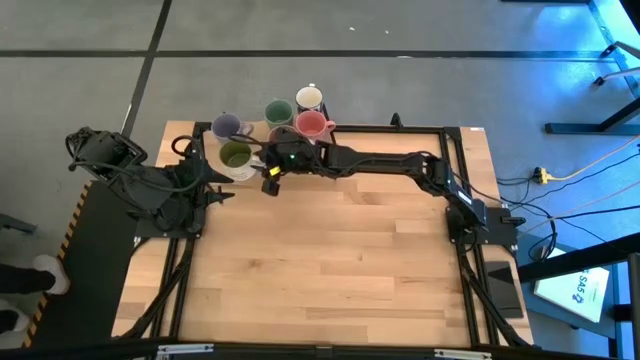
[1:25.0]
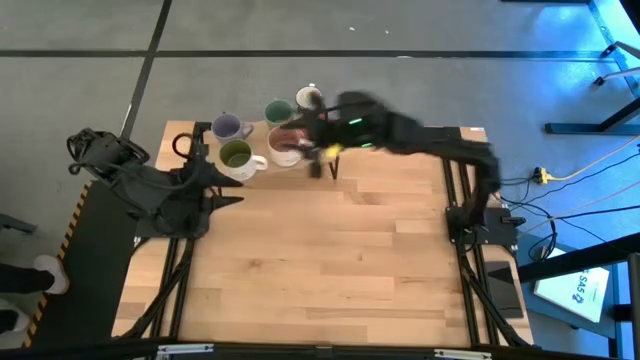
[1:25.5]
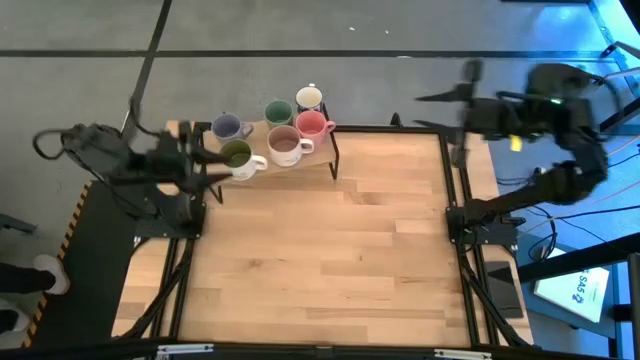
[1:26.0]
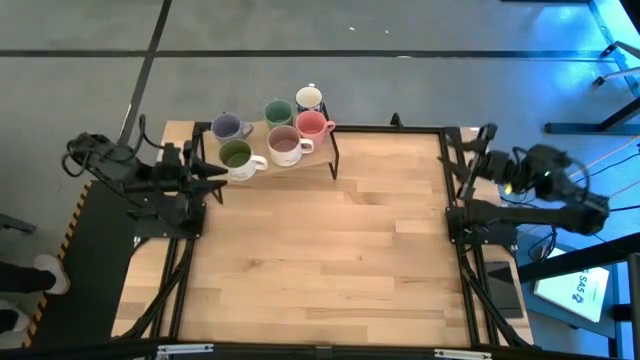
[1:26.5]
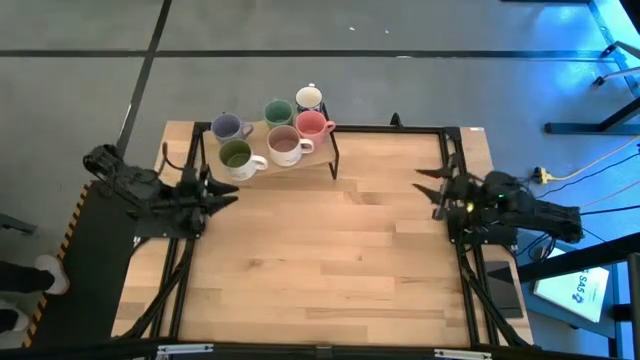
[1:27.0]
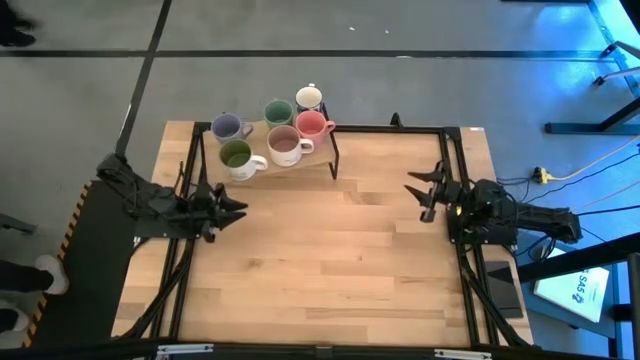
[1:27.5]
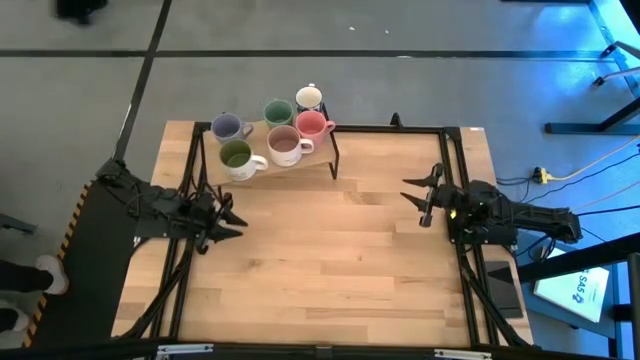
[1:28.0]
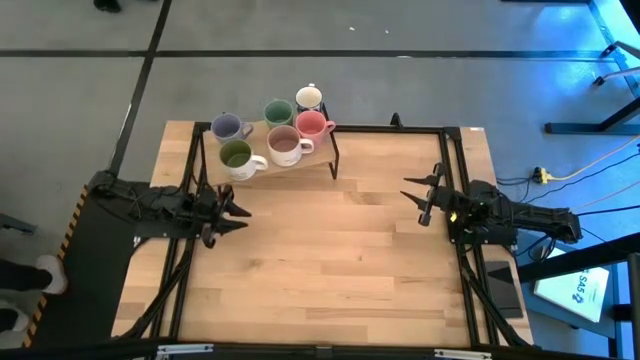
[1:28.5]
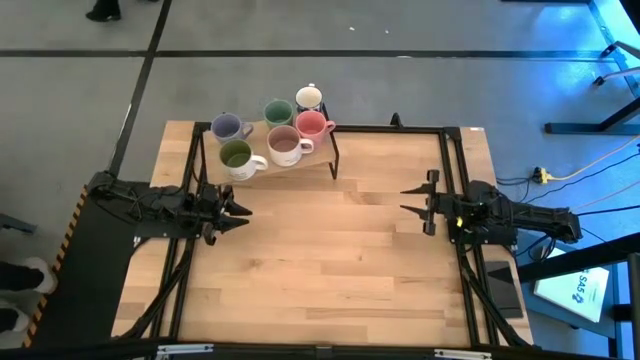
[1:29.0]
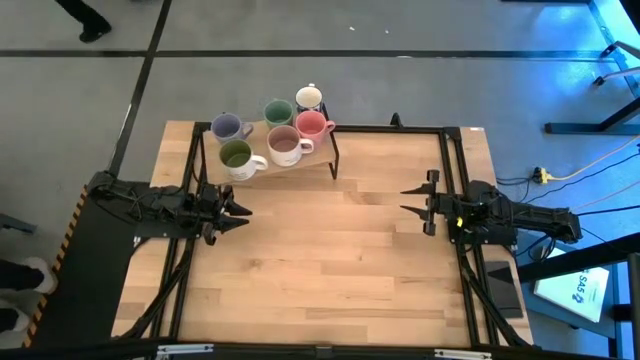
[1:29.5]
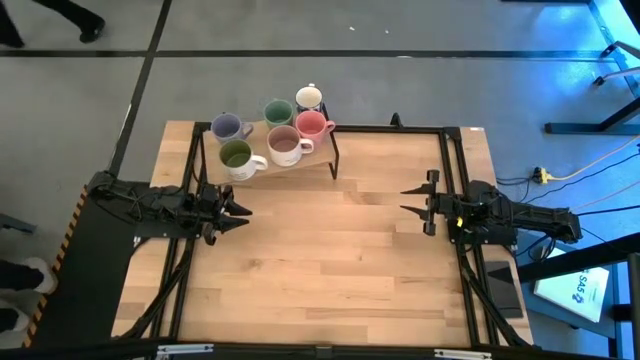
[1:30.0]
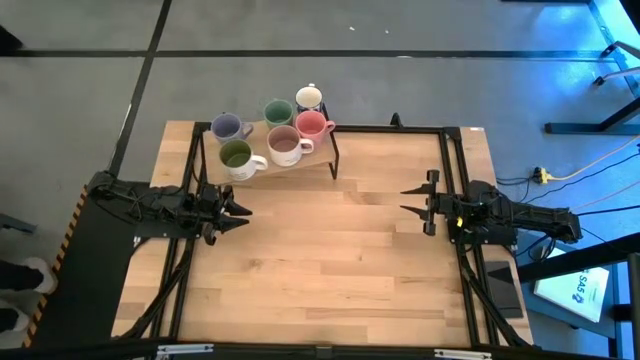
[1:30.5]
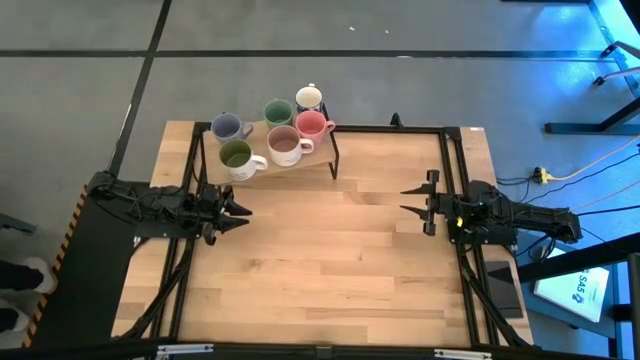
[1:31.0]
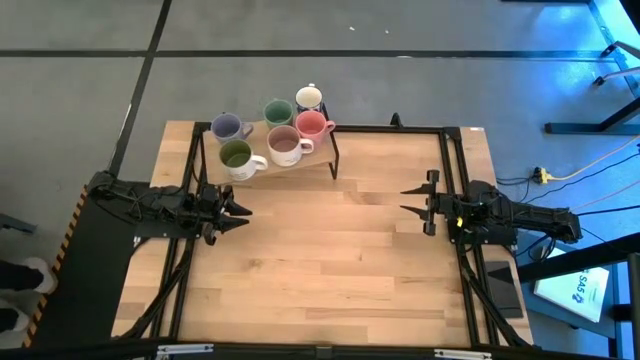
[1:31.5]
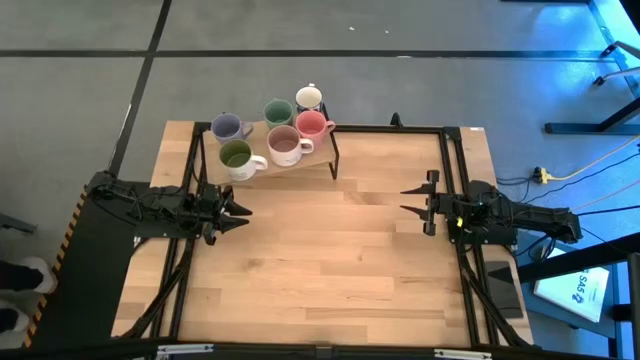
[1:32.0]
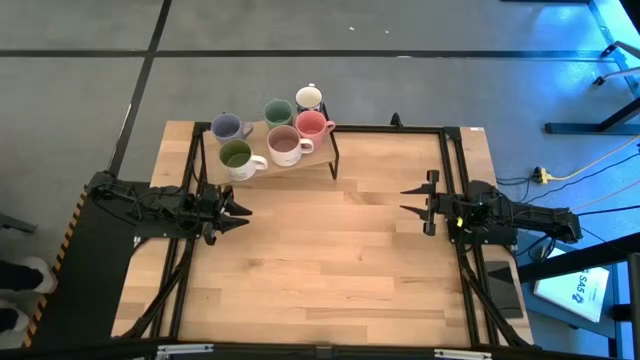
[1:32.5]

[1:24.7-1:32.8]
Task: Place coffee mugs
Return to Home Position

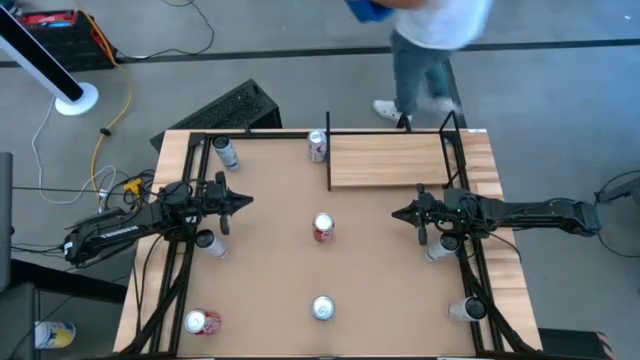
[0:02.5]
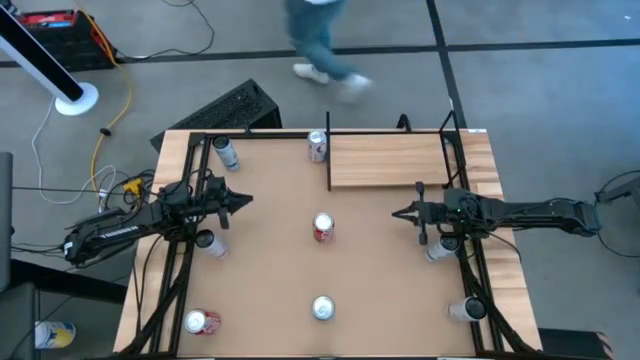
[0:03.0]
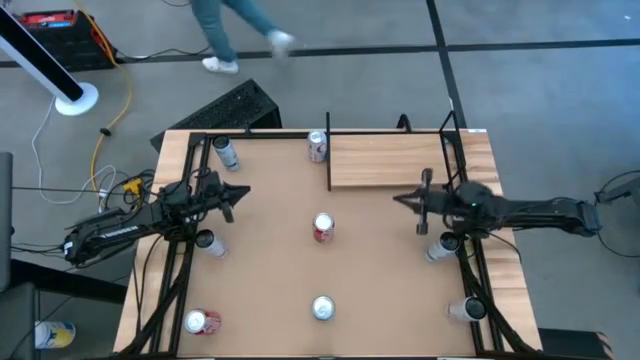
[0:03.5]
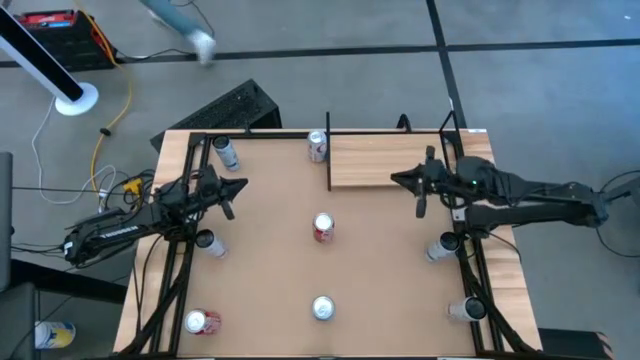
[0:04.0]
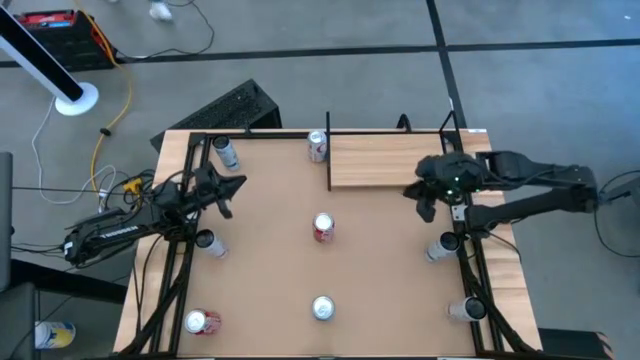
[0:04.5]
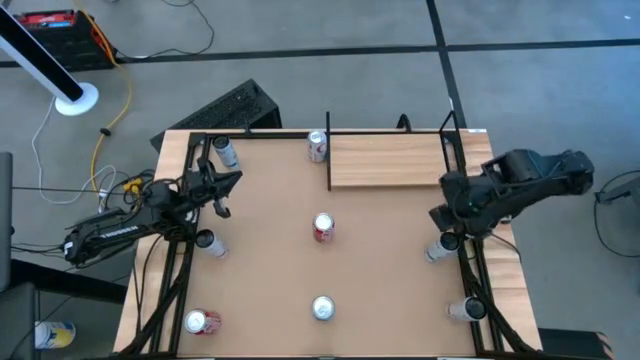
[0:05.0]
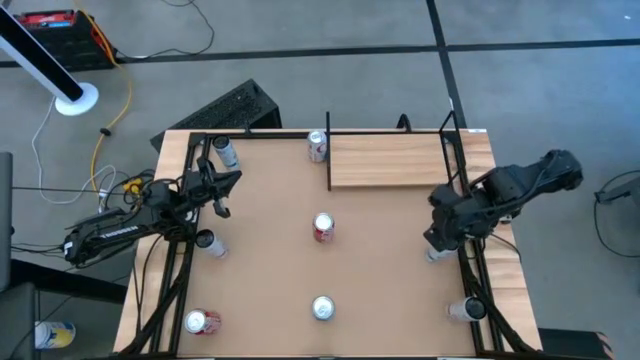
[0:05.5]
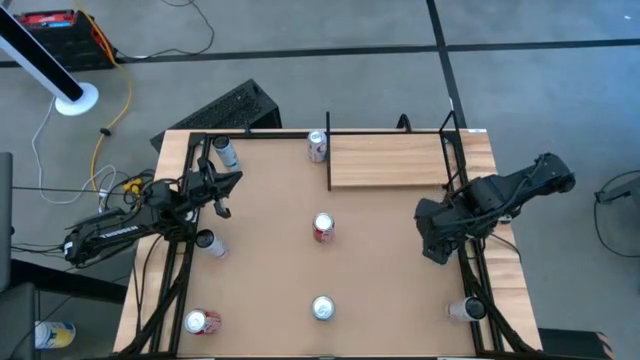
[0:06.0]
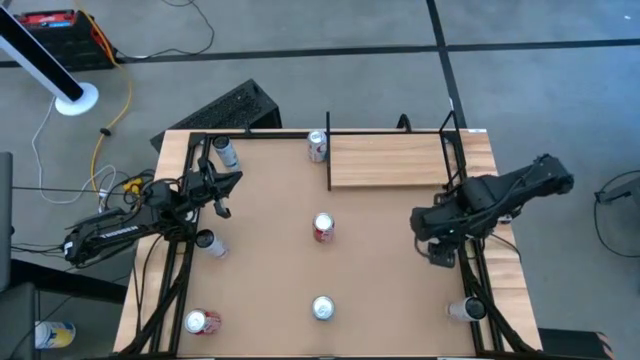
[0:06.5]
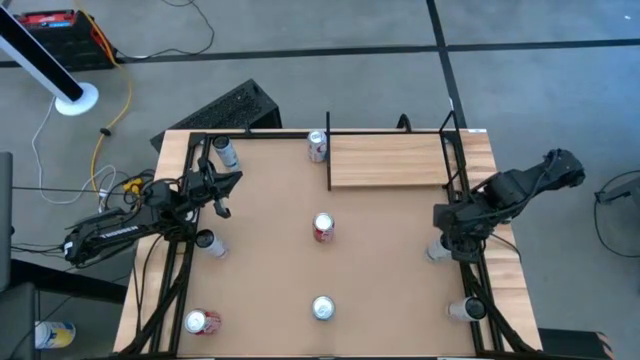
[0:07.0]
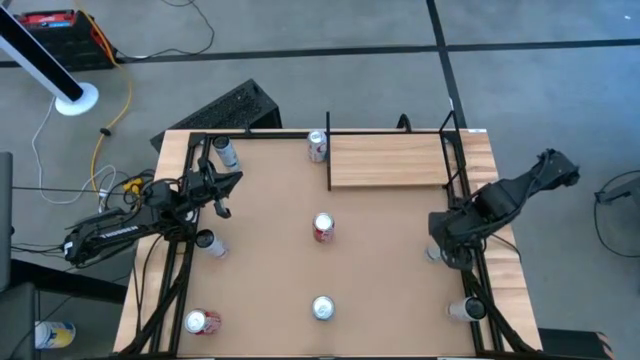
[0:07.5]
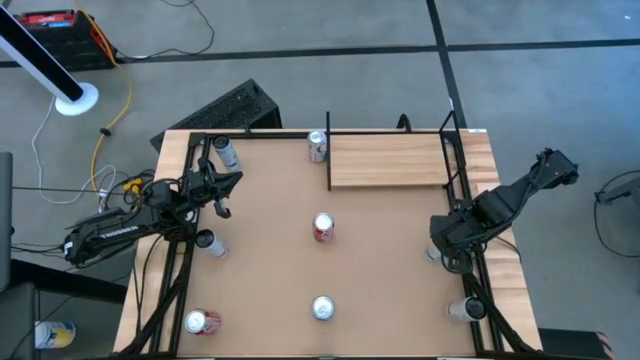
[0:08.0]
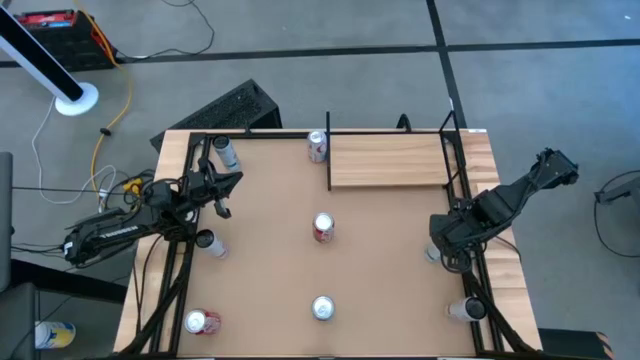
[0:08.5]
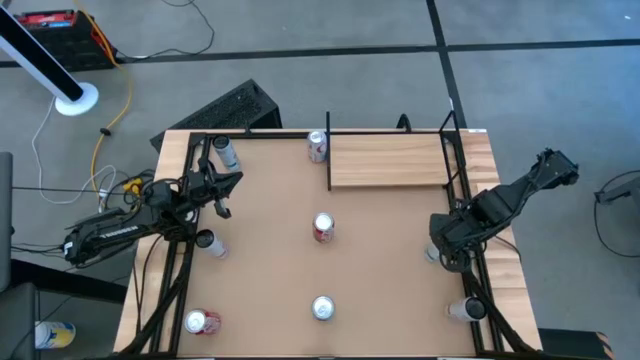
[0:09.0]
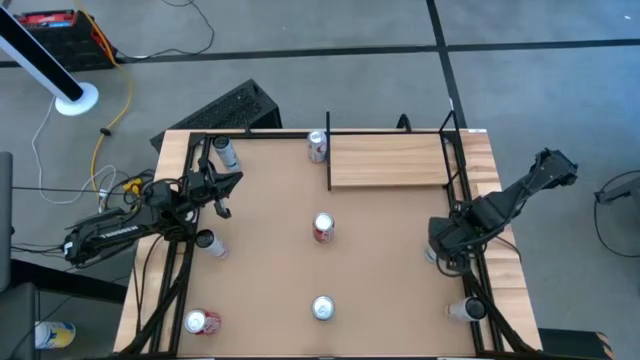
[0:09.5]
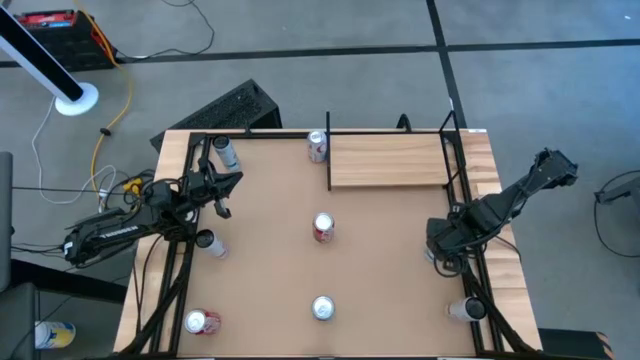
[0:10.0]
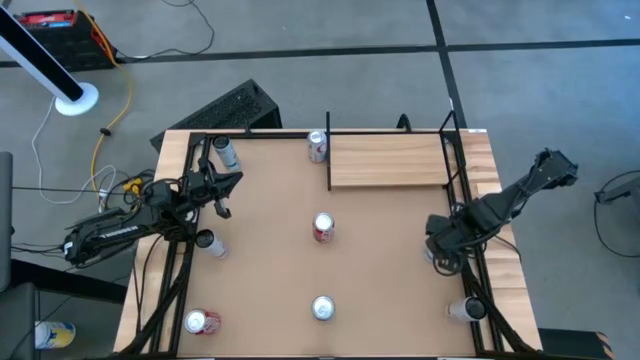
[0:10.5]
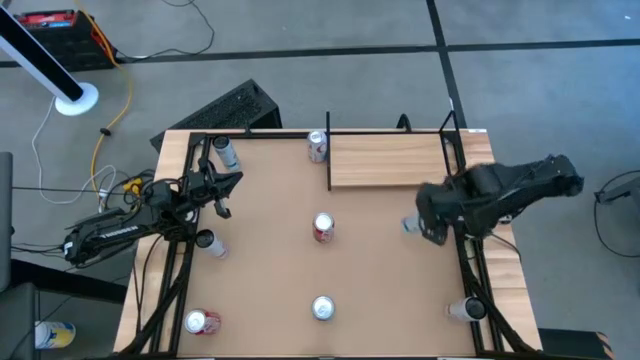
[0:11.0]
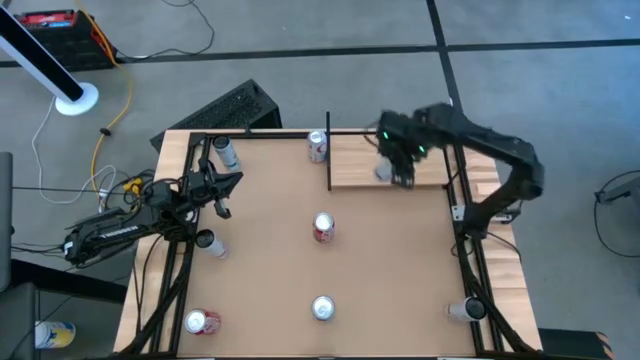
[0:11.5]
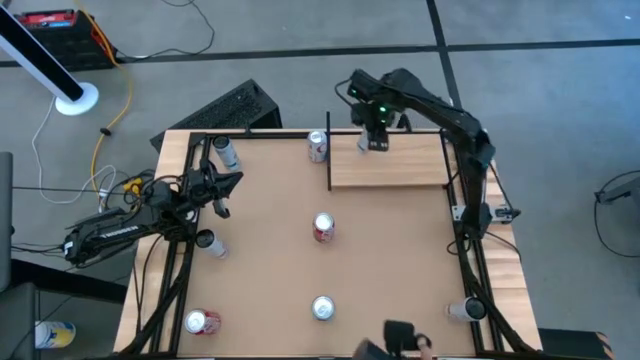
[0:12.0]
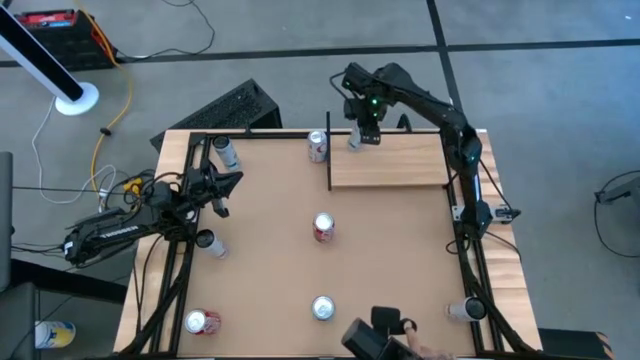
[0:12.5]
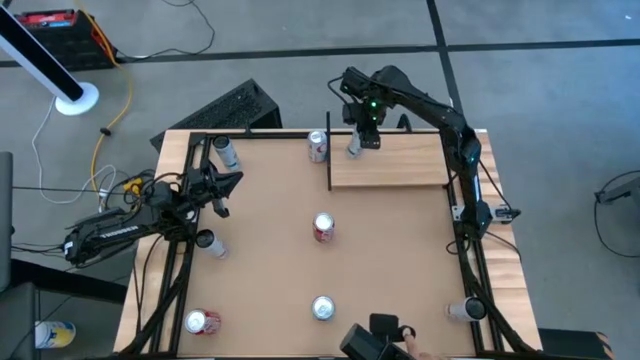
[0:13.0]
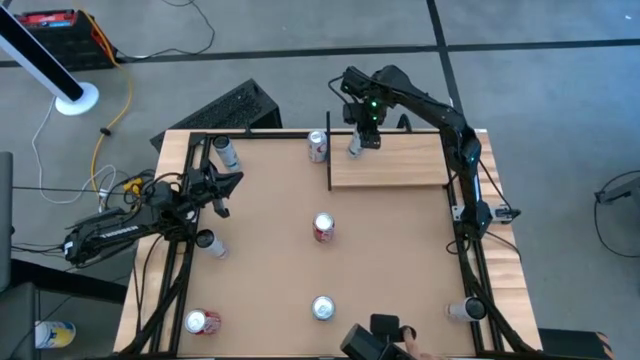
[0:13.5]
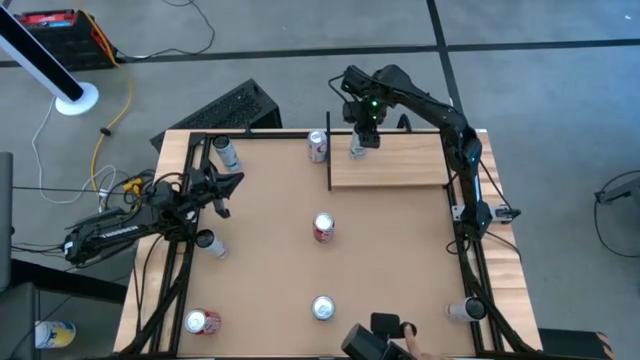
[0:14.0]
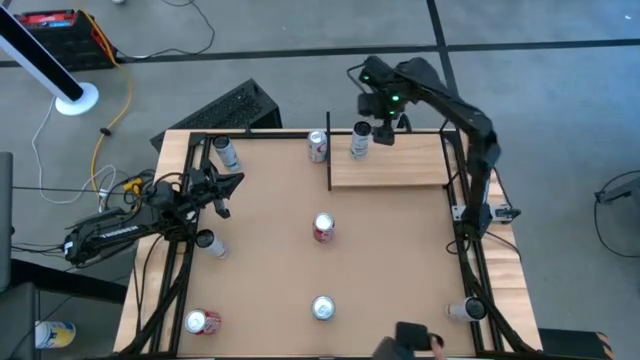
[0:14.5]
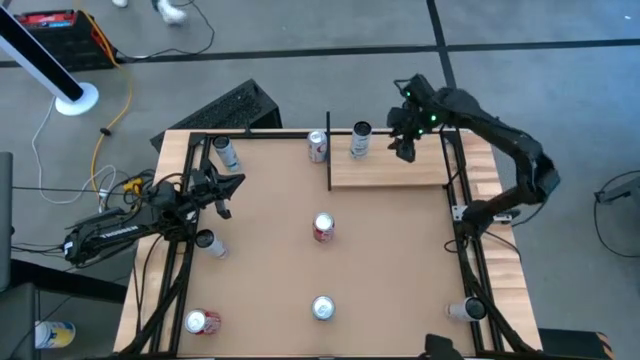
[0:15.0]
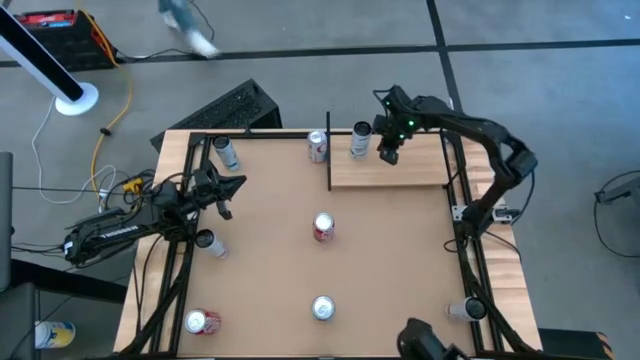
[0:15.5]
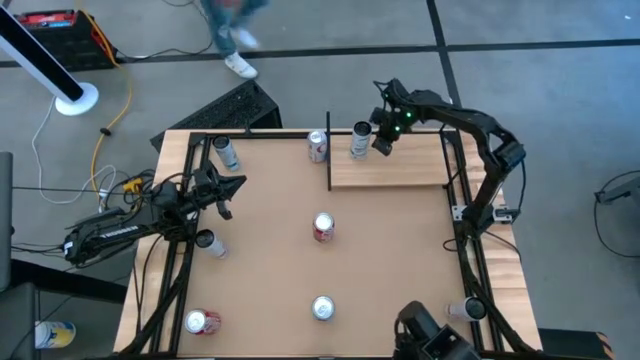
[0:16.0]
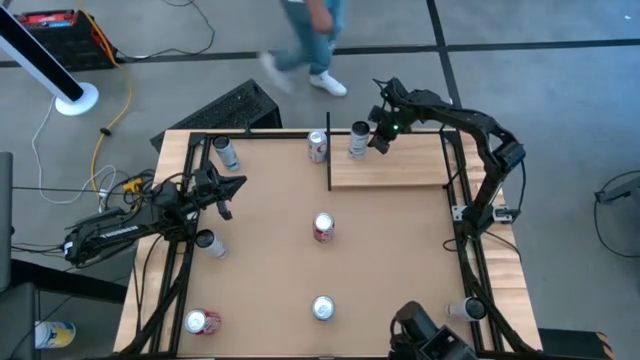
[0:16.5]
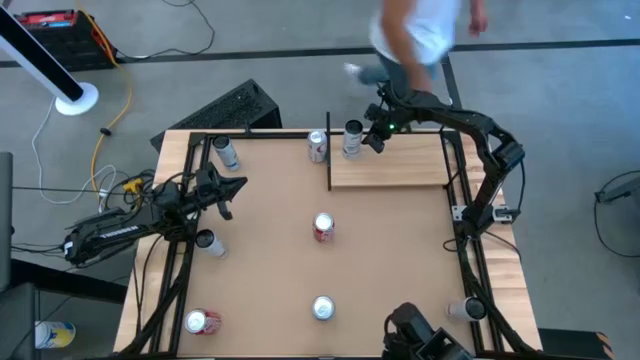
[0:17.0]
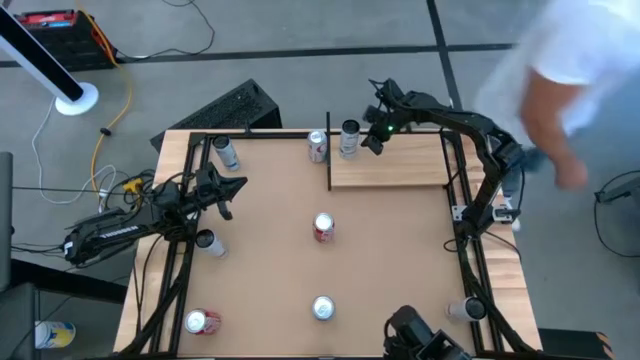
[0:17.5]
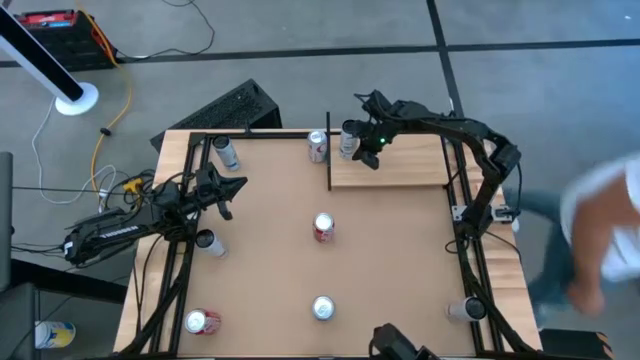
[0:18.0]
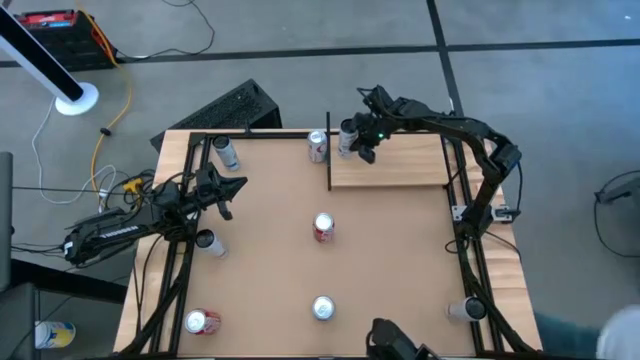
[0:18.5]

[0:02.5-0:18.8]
Task: Place canned beverage on shelf
Put the bottom blue soda can on the shelf
